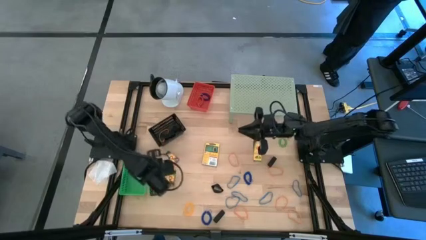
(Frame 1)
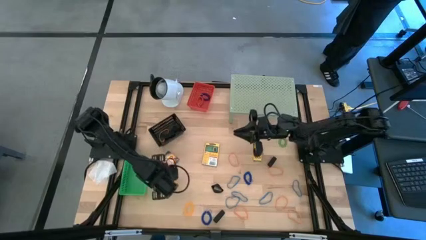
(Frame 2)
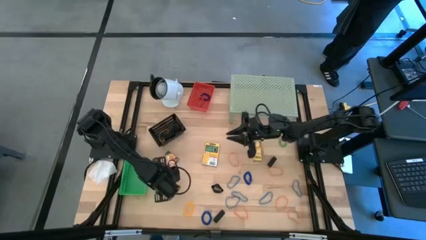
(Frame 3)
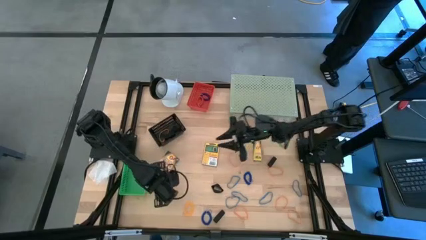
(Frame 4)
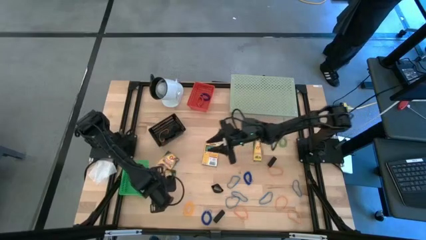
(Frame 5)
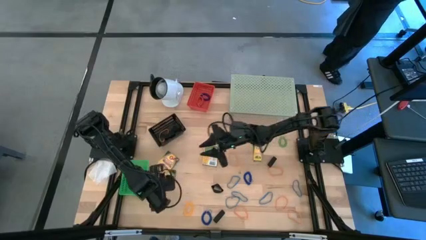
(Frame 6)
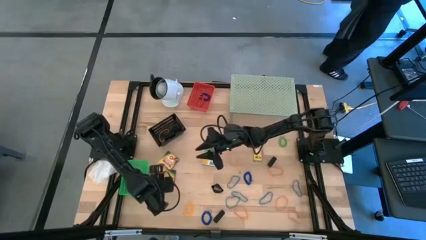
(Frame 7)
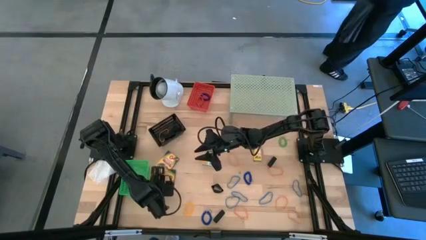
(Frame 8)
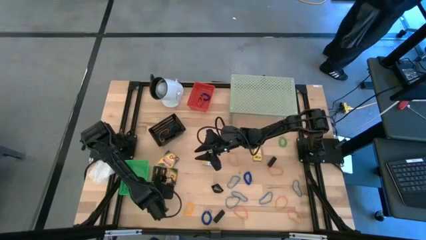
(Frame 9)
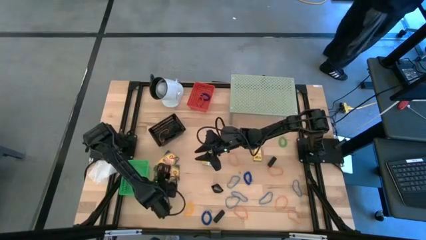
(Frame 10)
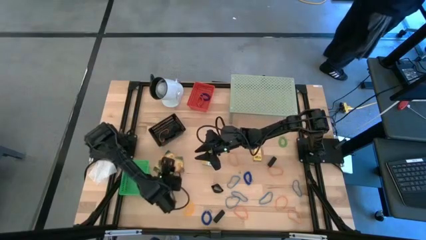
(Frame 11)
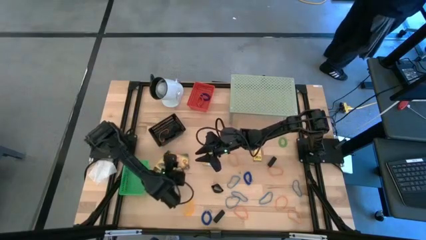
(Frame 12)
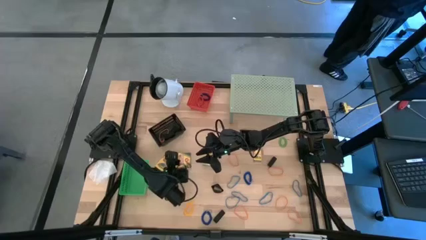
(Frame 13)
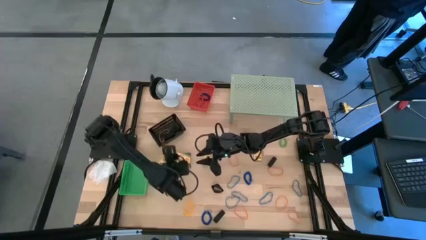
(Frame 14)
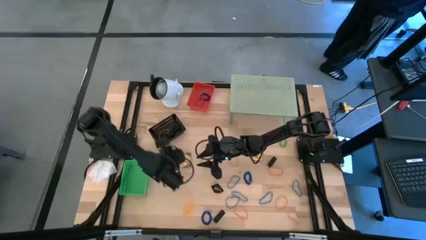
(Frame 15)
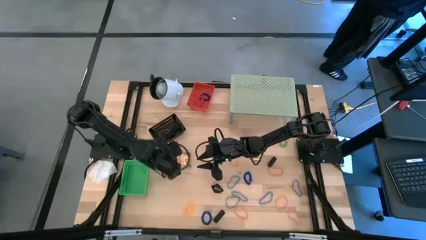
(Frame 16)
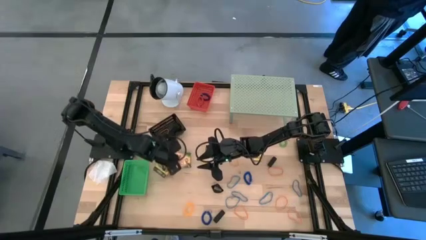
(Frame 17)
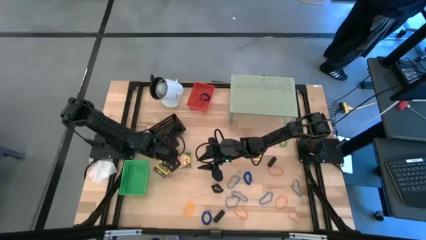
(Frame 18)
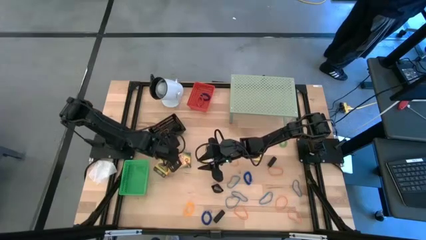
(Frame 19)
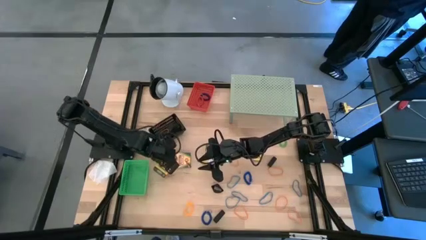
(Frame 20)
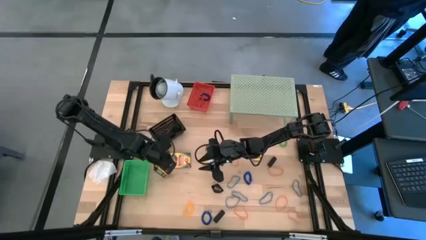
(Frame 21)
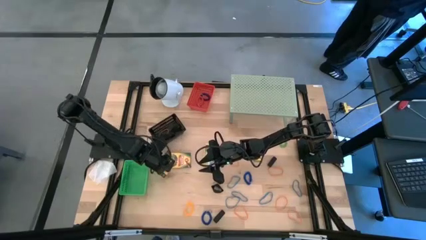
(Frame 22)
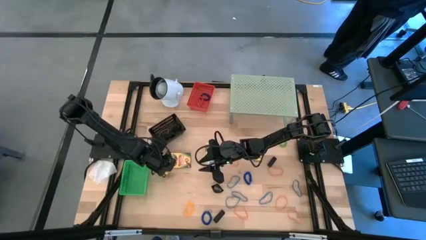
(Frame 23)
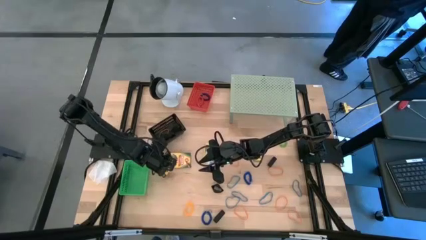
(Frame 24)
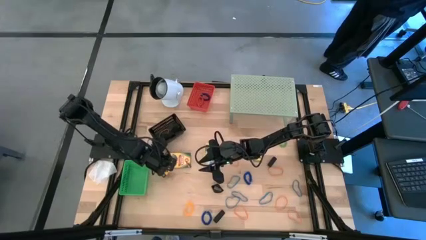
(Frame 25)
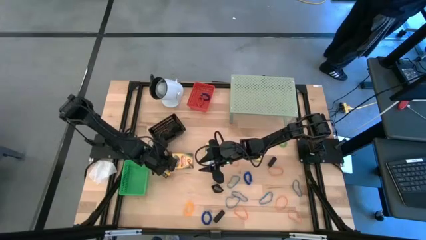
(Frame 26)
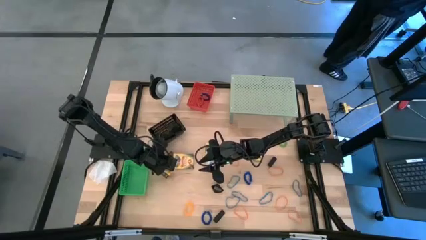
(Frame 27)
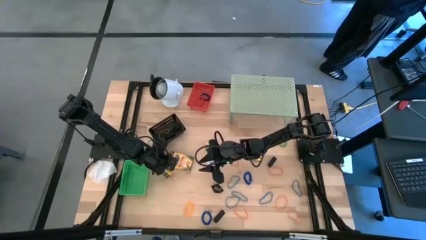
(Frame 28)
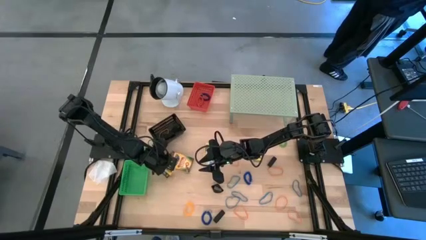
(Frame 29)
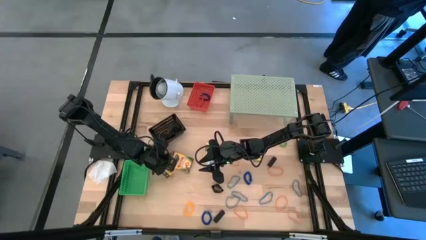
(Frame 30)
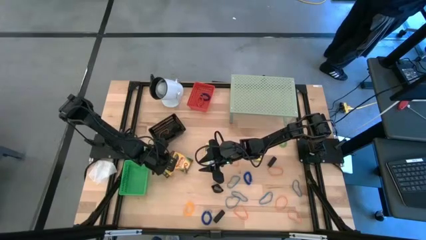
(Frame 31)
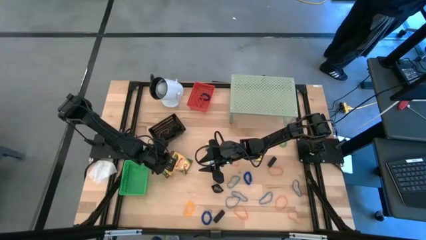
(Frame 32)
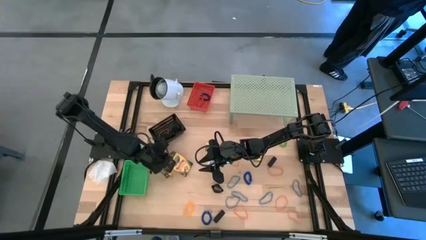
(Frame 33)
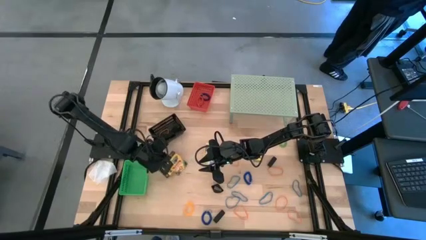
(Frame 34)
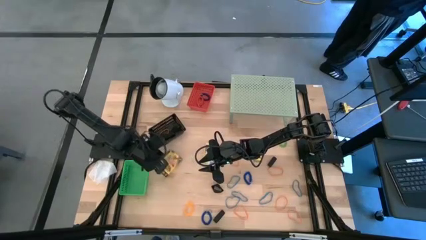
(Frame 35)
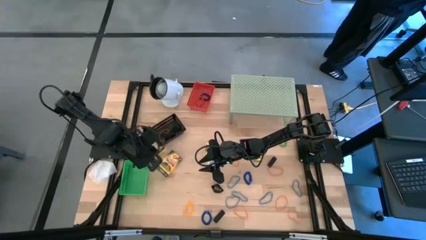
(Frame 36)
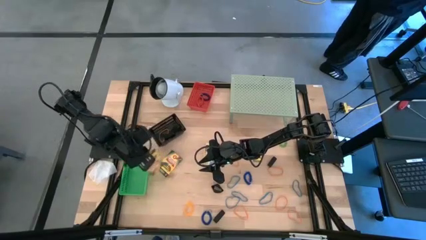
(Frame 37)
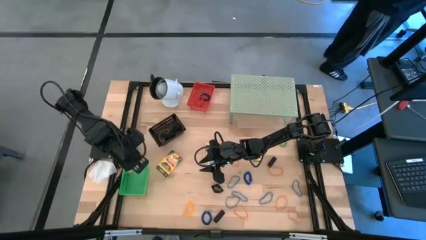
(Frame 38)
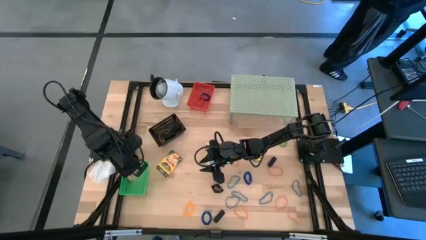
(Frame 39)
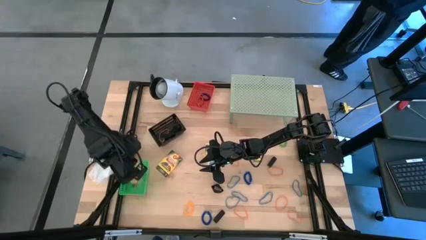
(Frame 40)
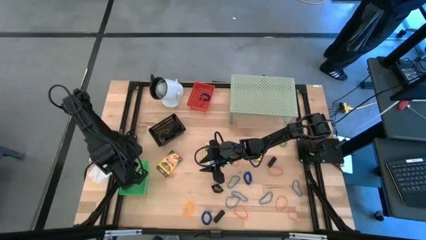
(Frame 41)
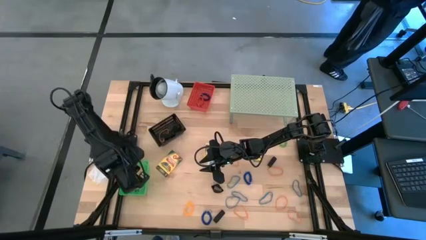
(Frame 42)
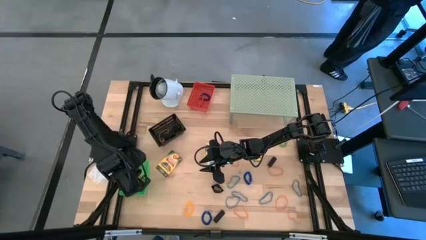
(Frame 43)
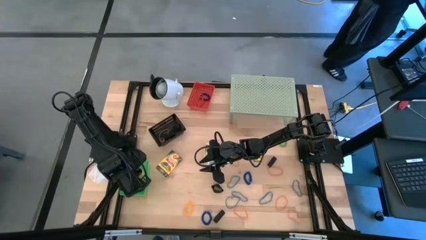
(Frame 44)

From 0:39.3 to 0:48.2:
Task: Pick & Place Office Desk Supplies
Put the crayons box into the green bin

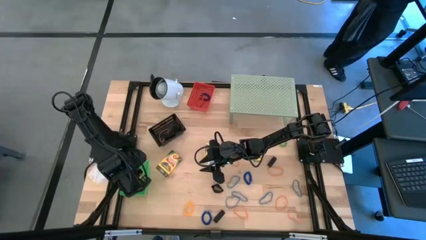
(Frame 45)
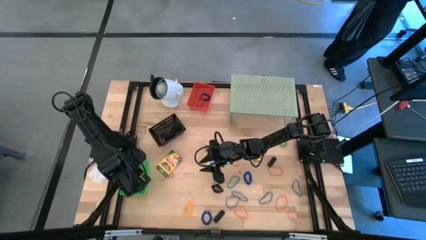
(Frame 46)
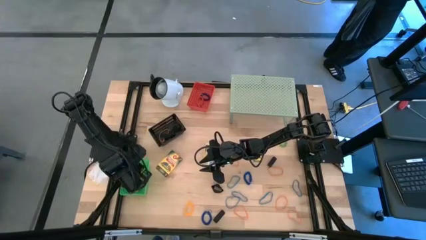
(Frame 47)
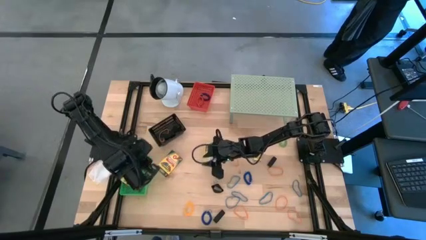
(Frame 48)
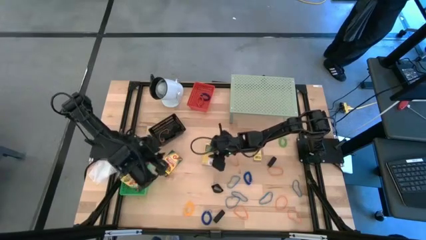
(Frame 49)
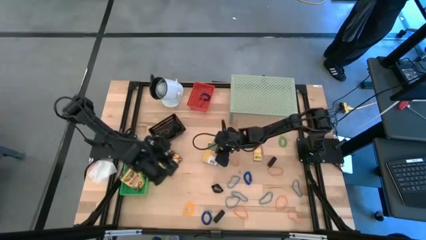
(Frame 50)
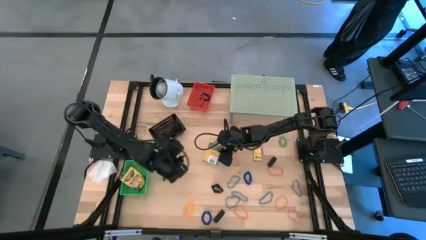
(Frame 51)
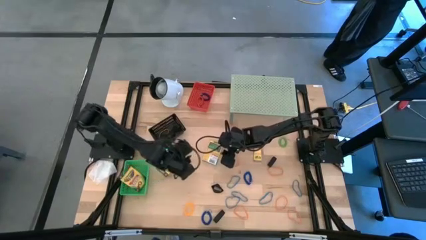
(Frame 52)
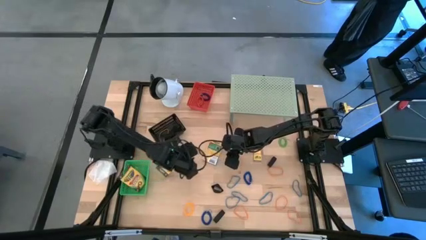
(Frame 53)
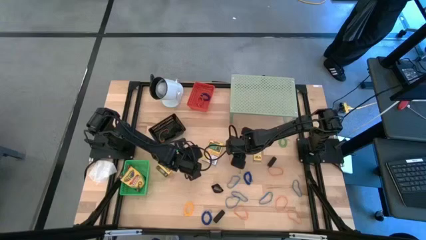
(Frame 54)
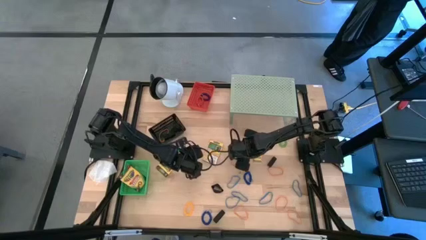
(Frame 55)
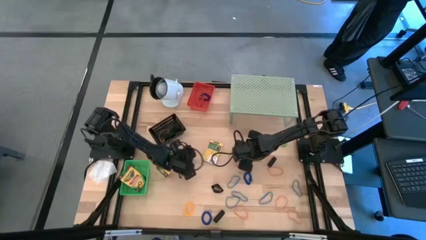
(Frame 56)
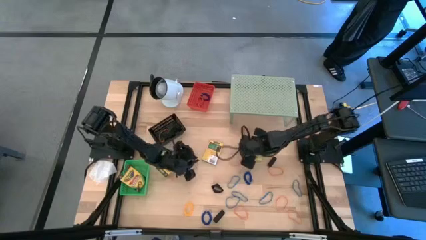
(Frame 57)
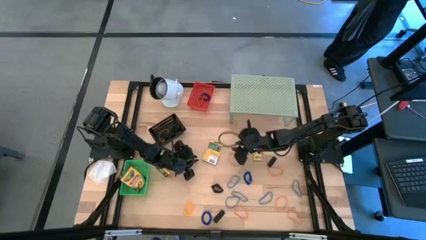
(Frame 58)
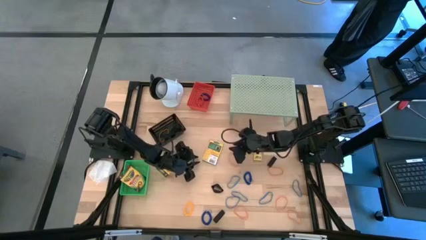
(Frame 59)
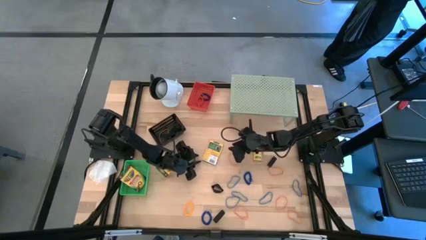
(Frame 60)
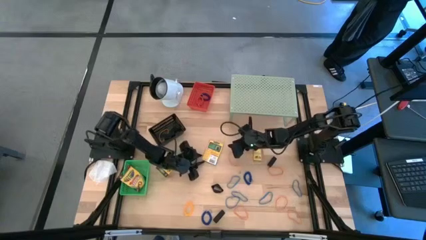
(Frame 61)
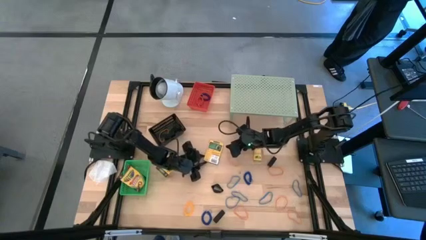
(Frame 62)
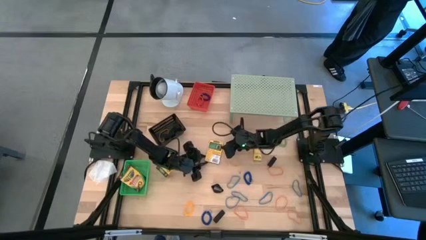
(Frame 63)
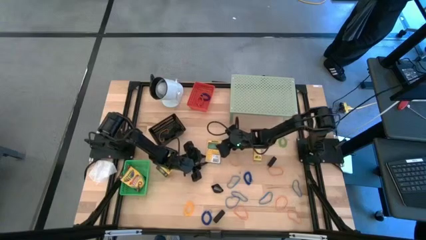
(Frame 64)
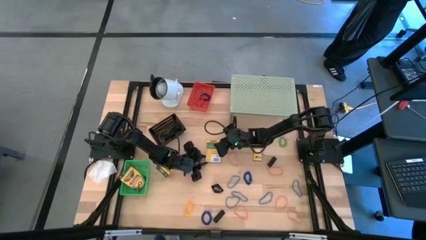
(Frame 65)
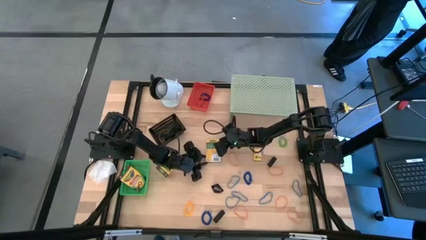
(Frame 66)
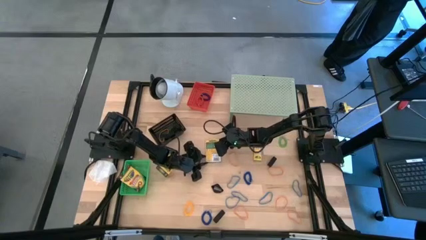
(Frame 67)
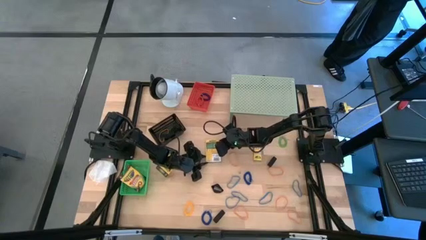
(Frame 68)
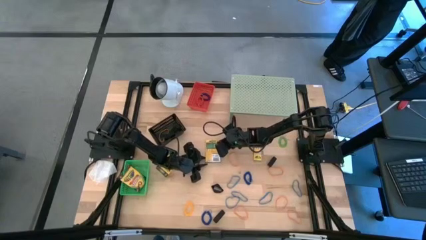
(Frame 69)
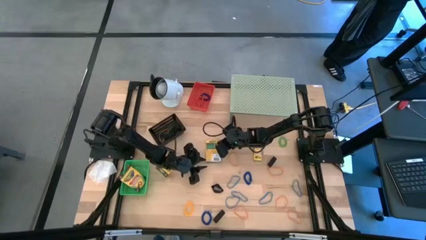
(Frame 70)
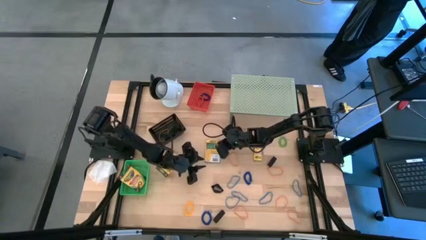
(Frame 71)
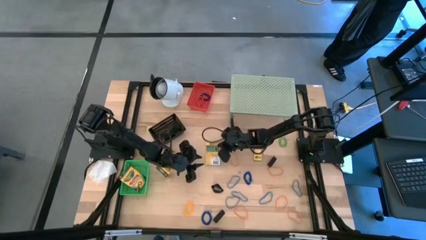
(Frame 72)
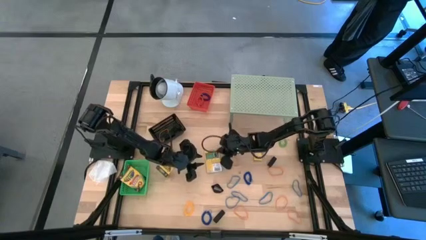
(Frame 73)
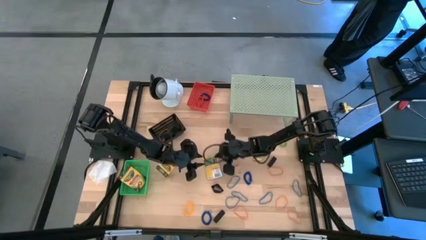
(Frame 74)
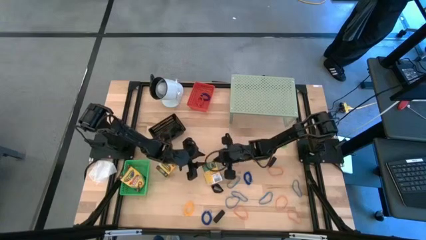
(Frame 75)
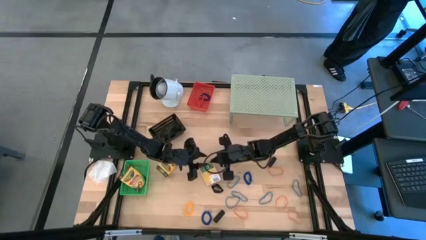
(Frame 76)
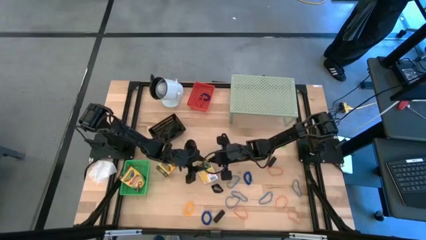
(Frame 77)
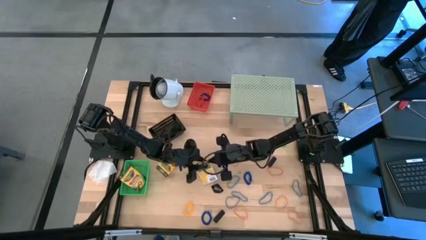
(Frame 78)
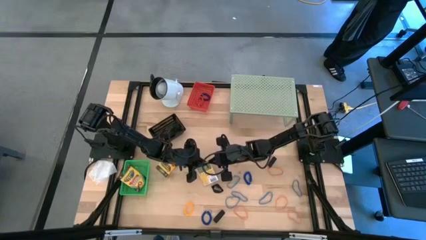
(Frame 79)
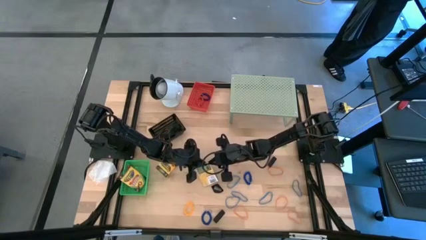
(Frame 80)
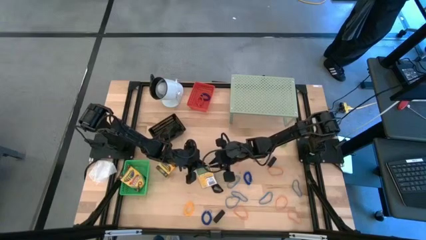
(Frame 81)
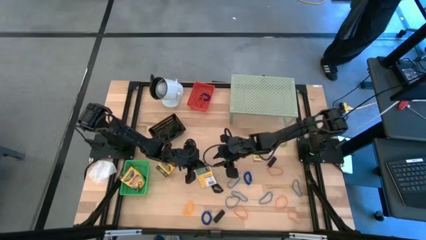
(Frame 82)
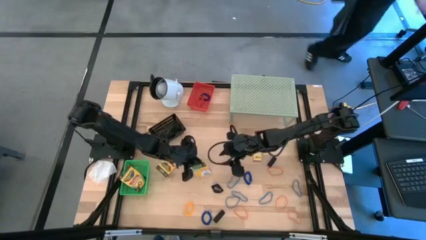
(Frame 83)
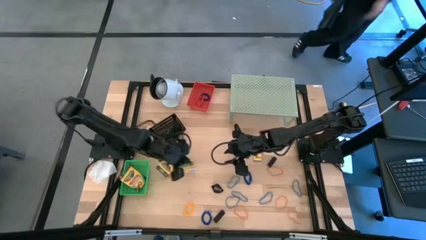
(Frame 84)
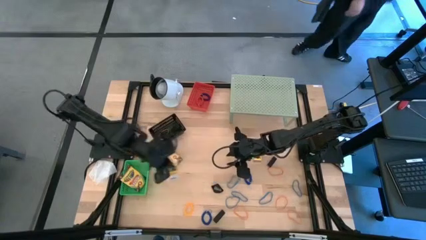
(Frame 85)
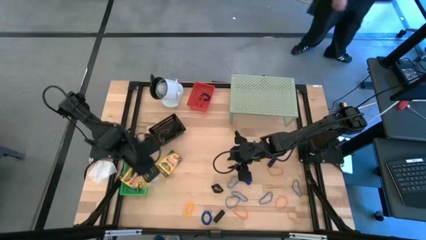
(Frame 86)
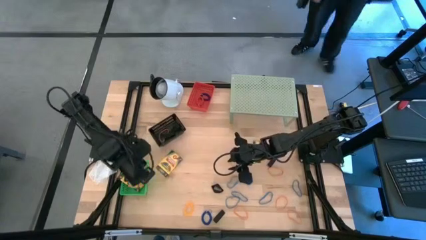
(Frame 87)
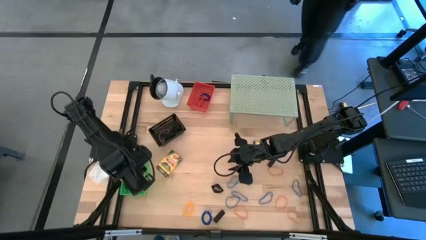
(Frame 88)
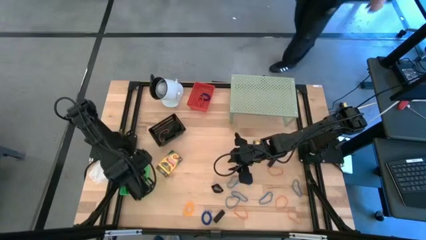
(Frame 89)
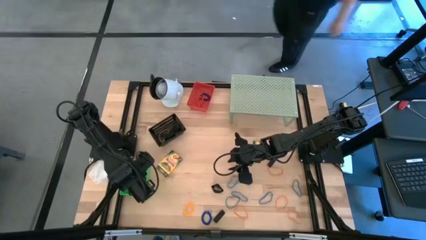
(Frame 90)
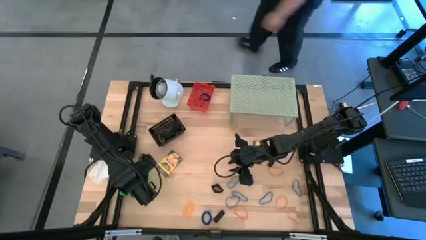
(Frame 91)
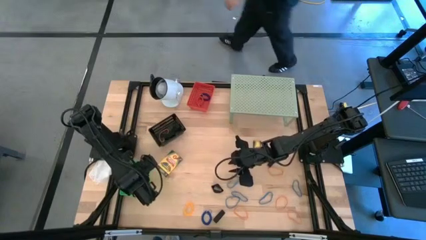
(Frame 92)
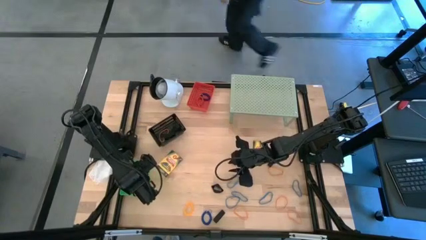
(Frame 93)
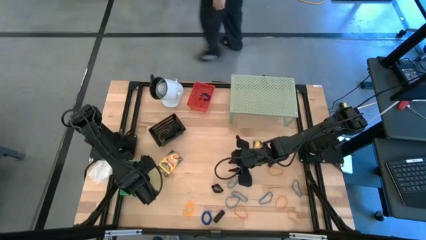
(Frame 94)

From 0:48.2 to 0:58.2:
Put the crayons box into the green bin
